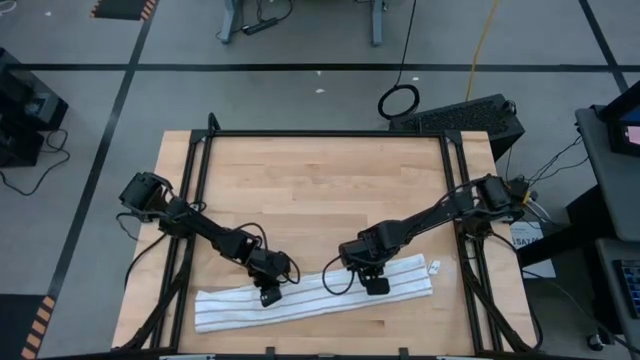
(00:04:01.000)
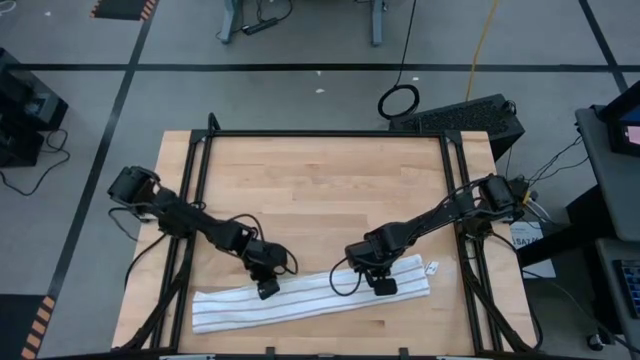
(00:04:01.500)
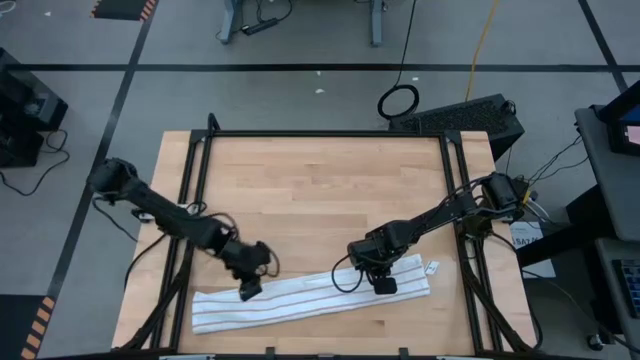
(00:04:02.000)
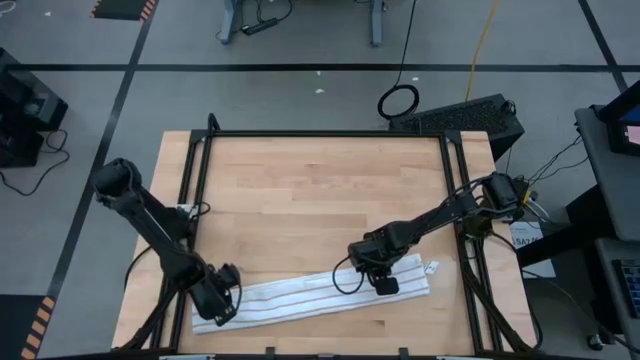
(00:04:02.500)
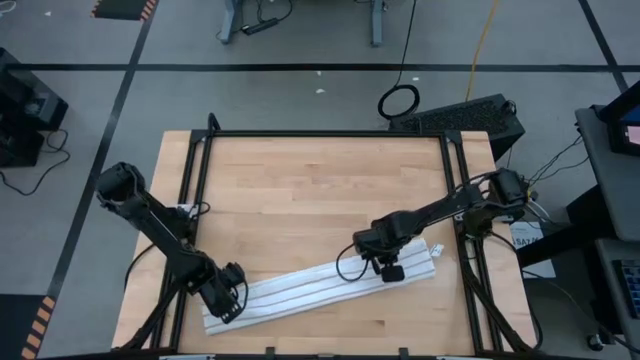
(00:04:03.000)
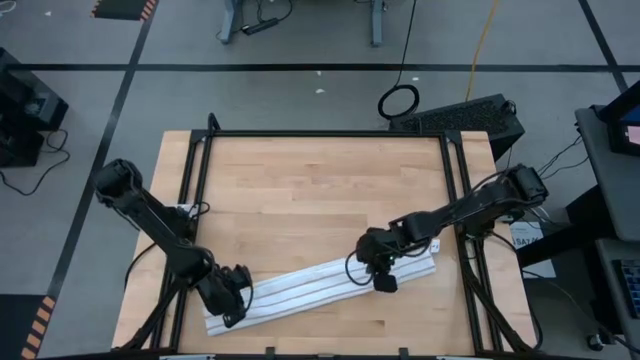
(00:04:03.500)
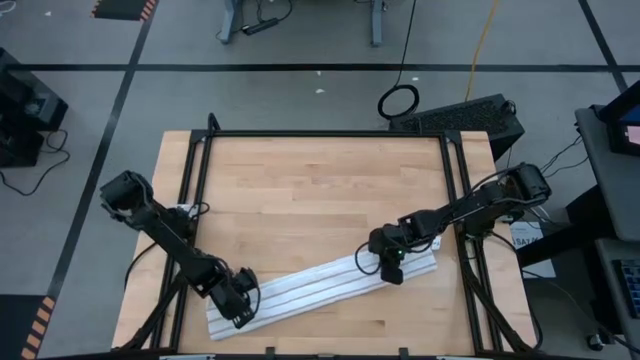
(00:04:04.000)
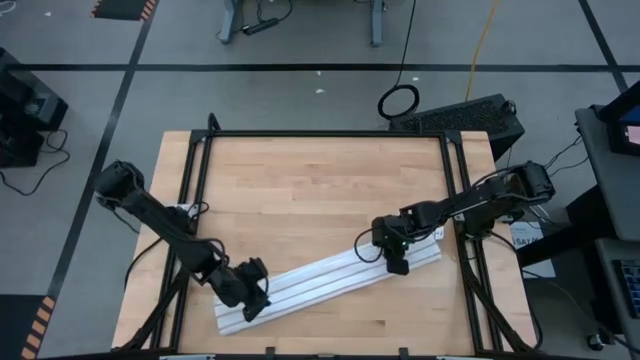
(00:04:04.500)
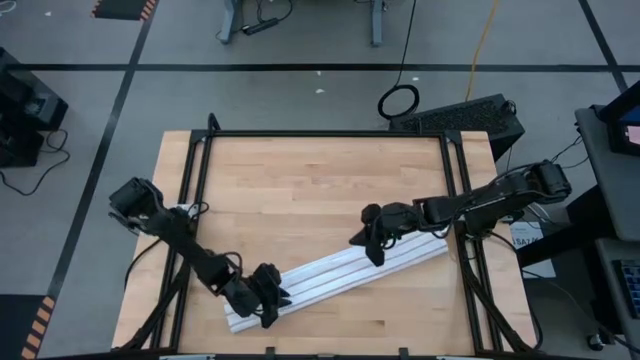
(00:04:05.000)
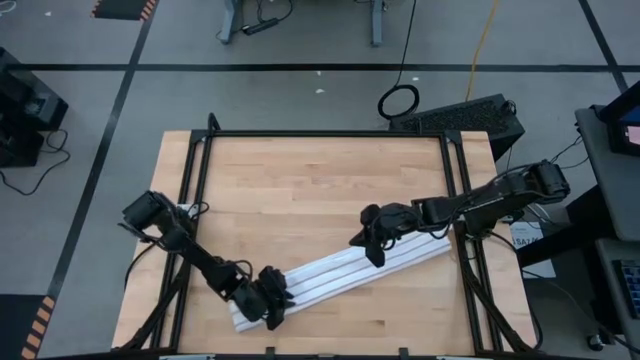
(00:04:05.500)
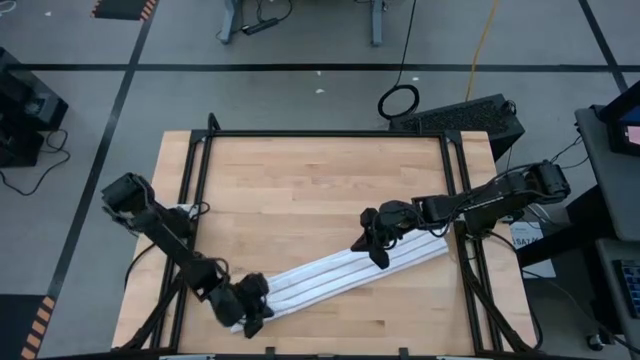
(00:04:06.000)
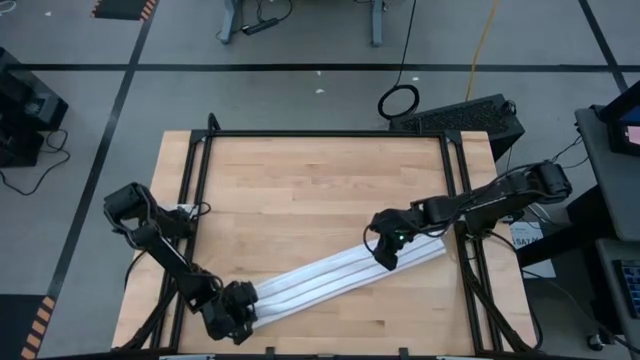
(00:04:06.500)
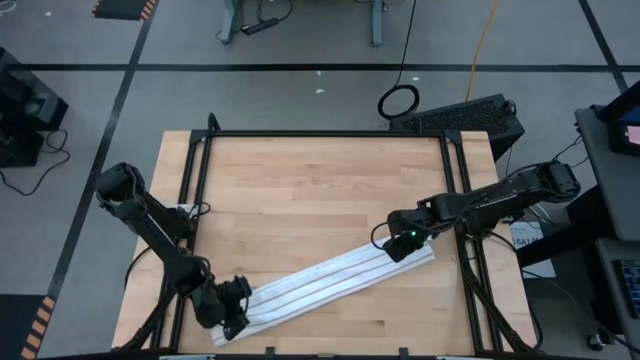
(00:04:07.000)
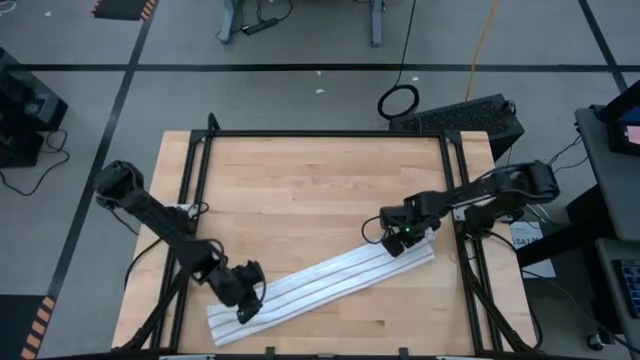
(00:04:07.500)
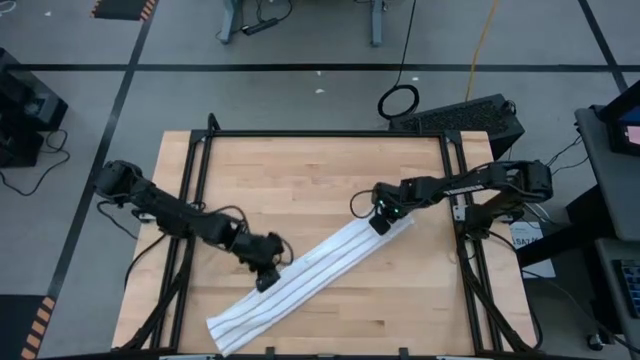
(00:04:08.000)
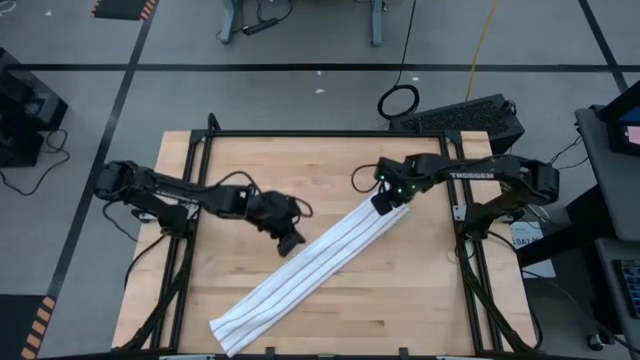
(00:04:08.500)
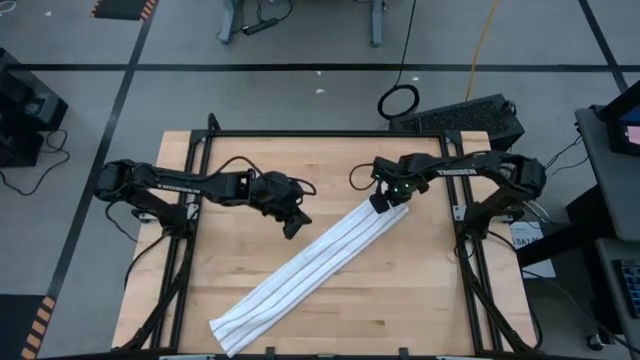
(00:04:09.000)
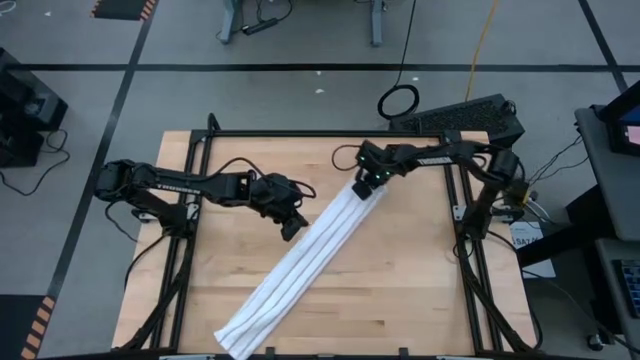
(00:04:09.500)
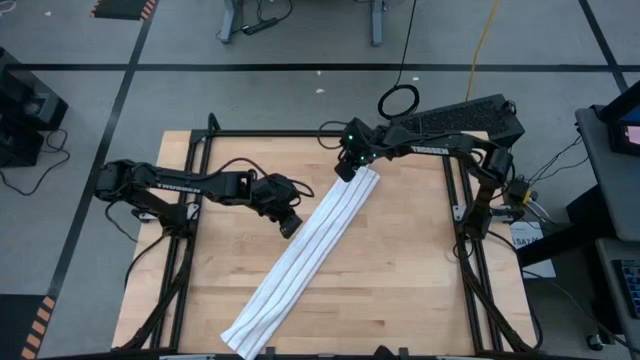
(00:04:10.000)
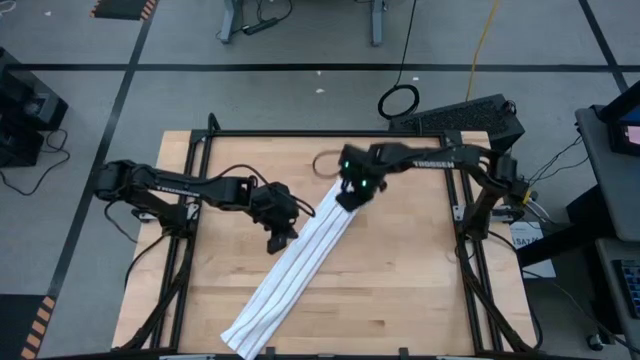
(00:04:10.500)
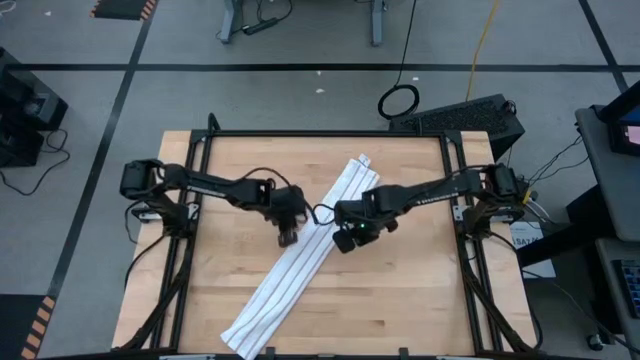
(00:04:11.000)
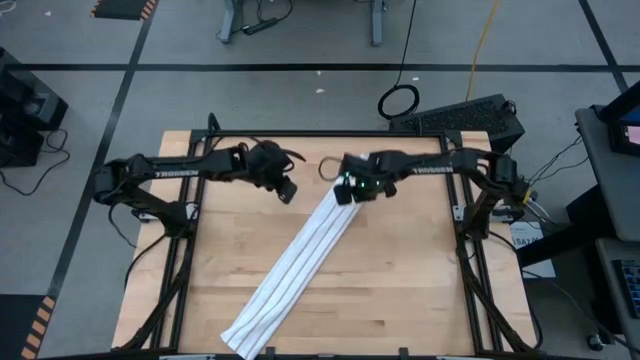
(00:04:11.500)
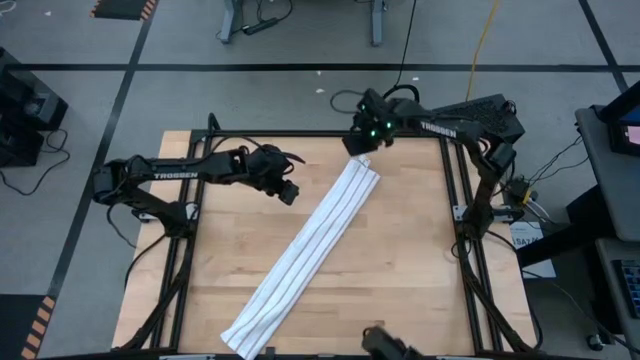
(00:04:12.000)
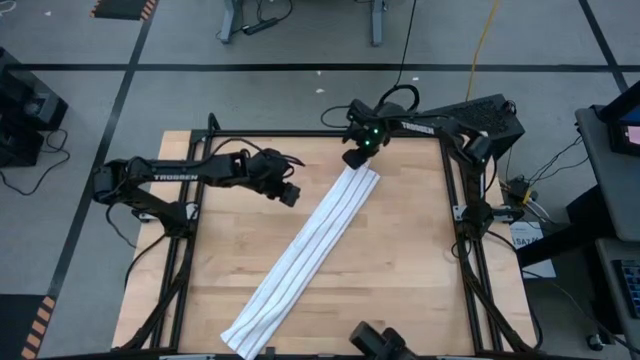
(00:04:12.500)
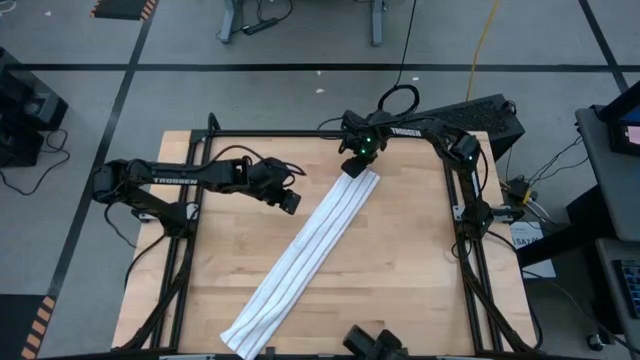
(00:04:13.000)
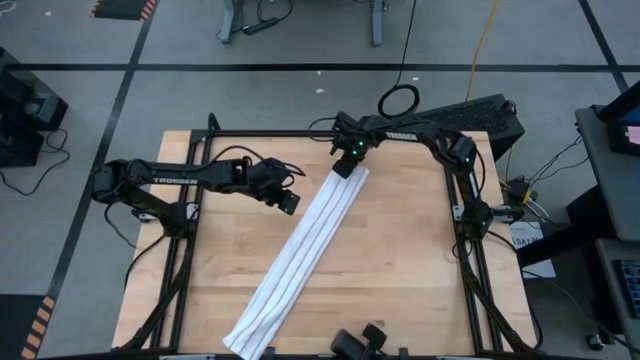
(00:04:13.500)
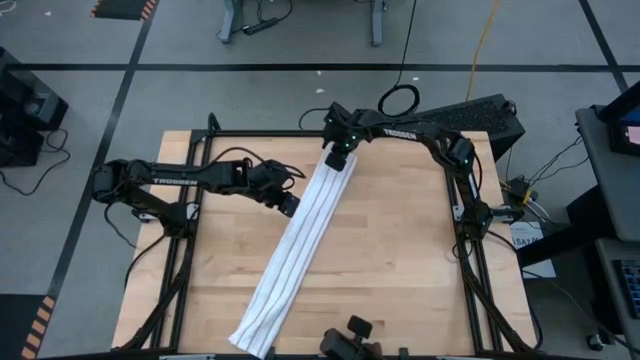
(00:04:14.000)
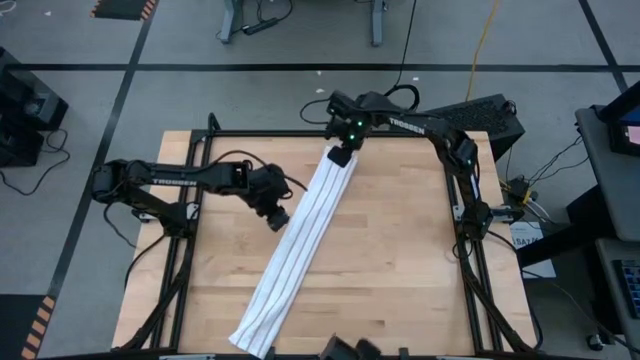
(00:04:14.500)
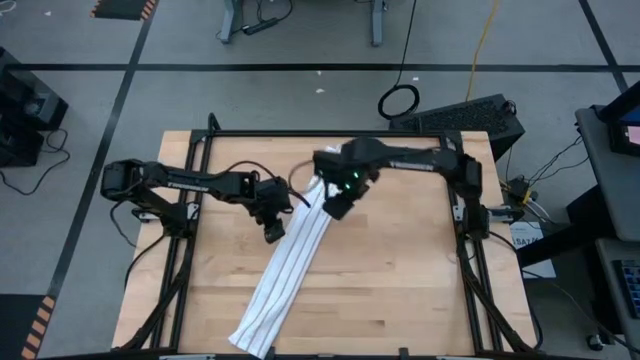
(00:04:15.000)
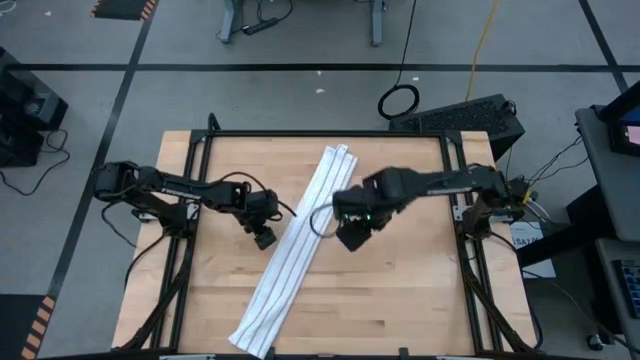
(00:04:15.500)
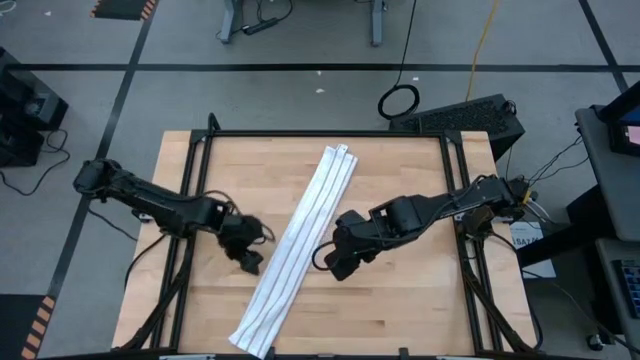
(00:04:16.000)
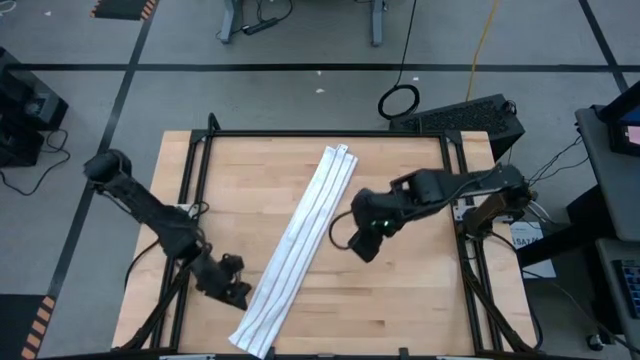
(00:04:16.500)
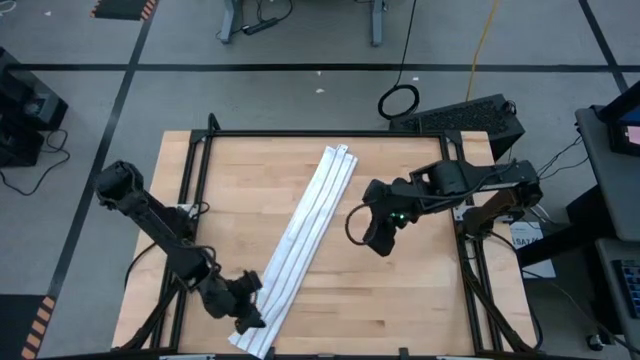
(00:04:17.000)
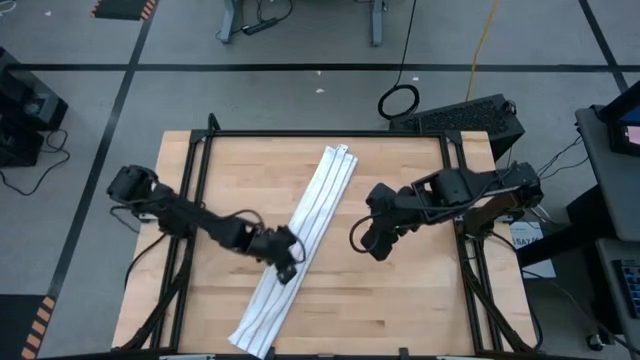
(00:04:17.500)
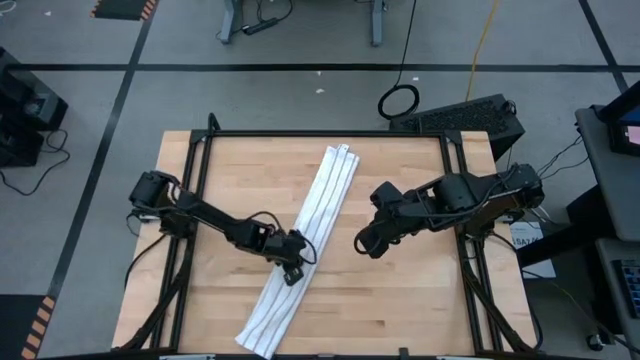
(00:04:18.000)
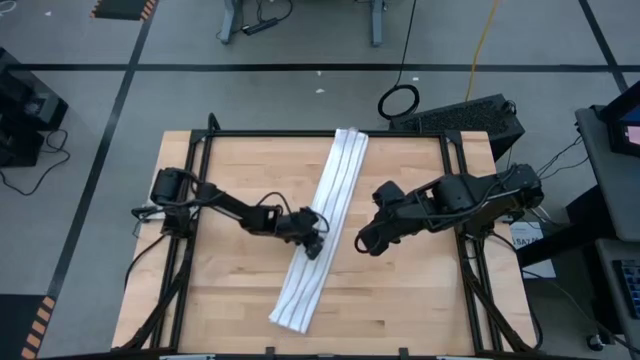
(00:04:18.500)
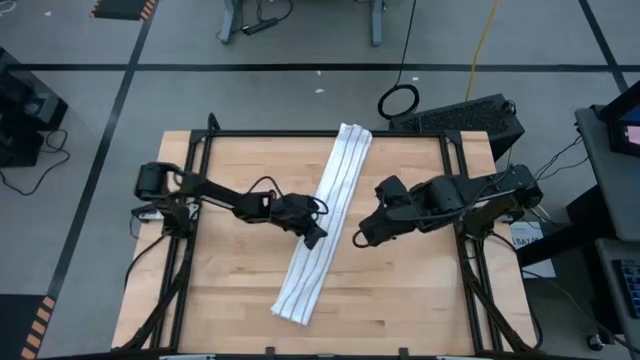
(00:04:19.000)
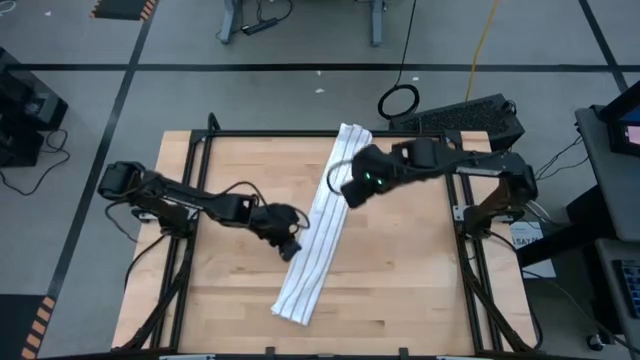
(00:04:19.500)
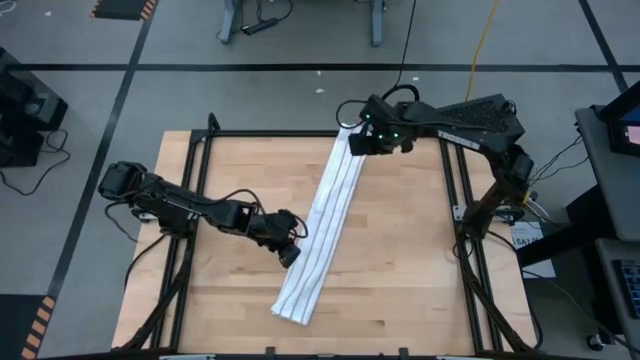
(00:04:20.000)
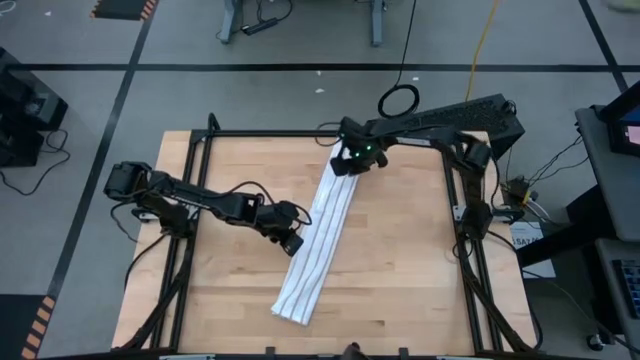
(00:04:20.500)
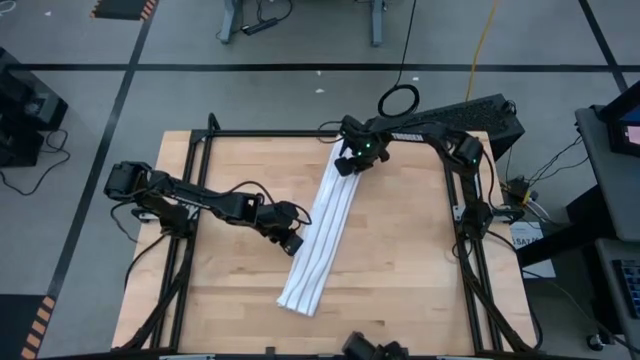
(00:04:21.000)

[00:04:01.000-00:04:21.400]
Task: Roll towel into tight, uniform cylinder
Fold the white brown kitchen towel

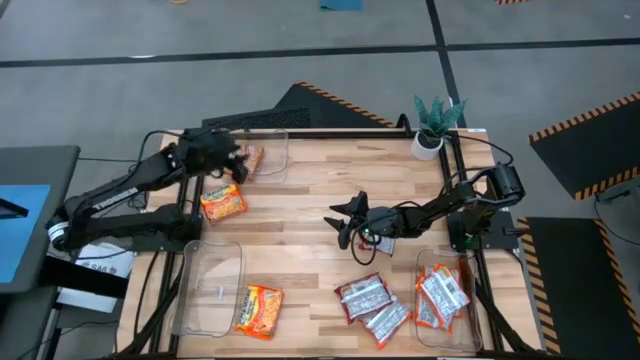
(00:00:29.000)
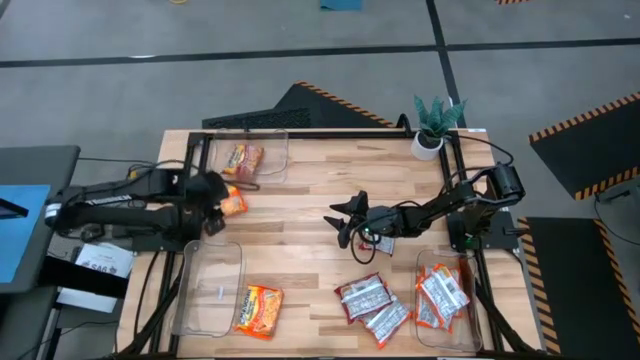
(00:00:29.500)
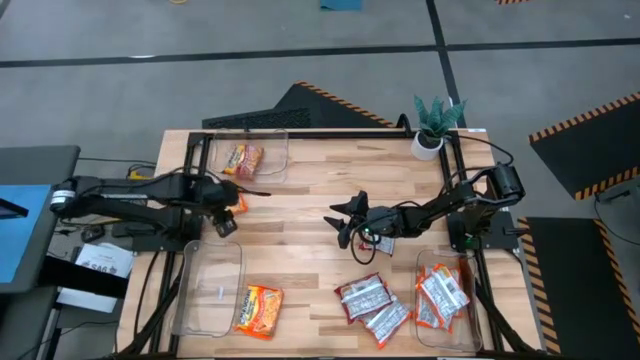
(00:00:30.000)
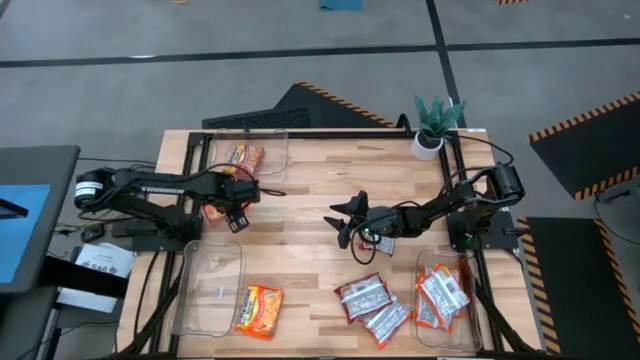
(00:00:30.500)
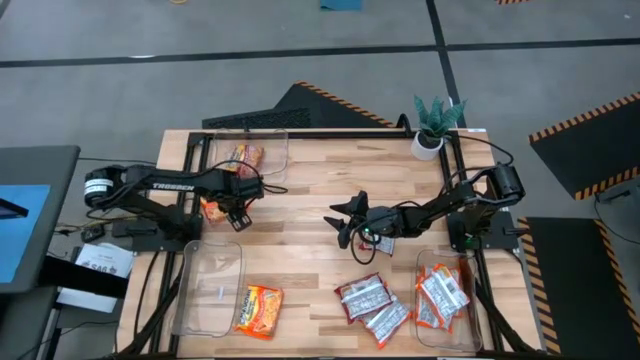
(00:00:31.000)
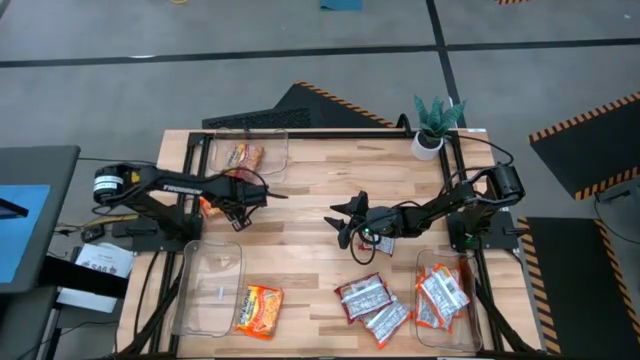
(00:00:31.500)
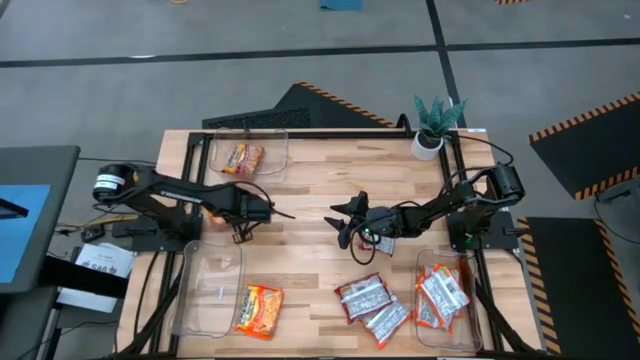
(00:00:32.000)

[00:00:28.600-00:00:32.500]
Task: Sort Maruchan noodles
Put the orange noodle pack into the bottom left transparent bin
